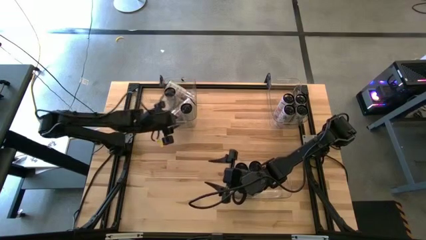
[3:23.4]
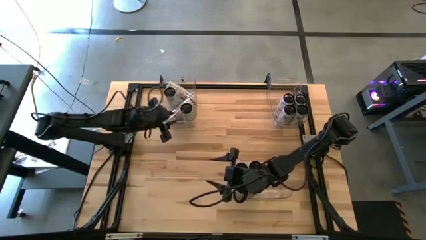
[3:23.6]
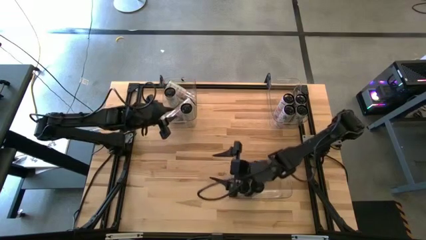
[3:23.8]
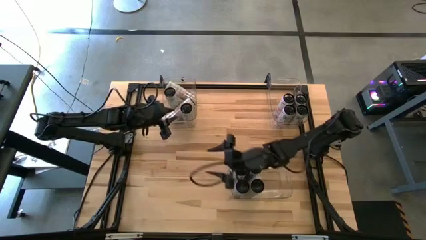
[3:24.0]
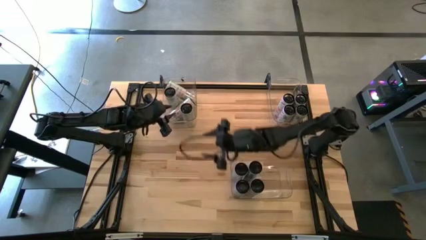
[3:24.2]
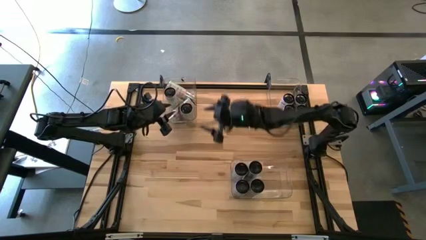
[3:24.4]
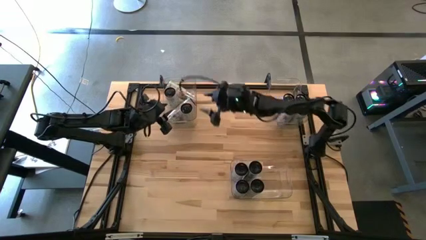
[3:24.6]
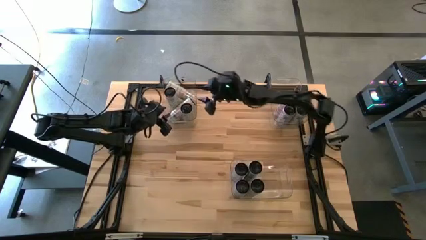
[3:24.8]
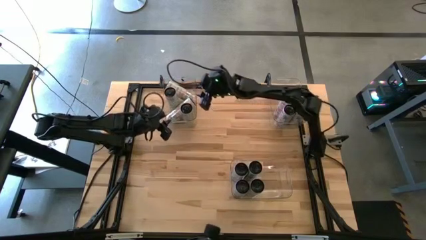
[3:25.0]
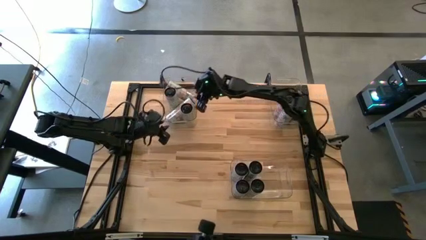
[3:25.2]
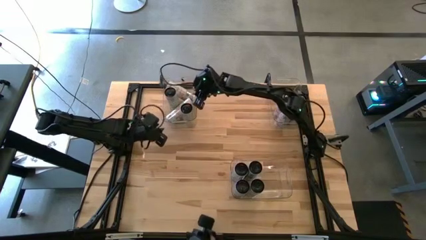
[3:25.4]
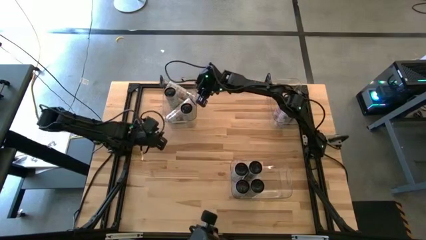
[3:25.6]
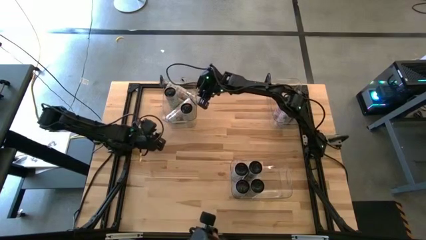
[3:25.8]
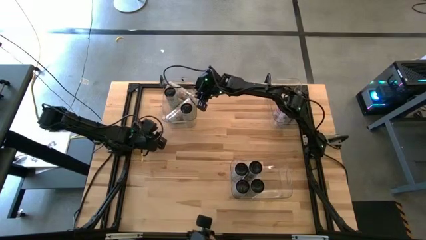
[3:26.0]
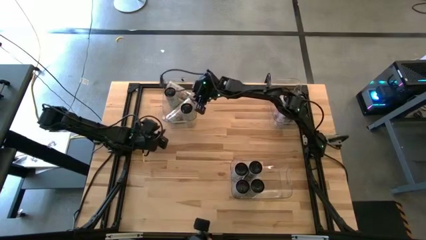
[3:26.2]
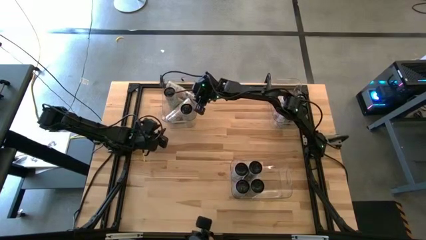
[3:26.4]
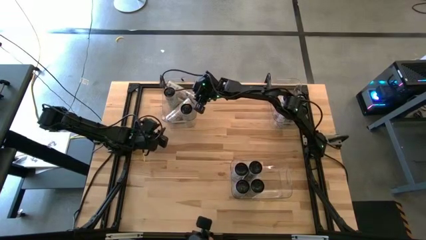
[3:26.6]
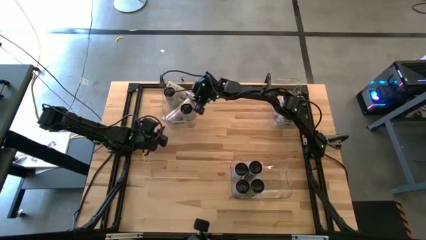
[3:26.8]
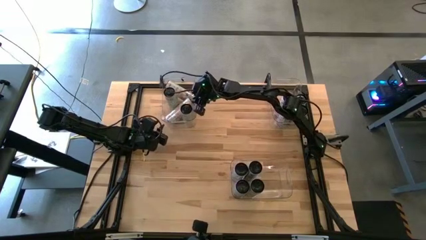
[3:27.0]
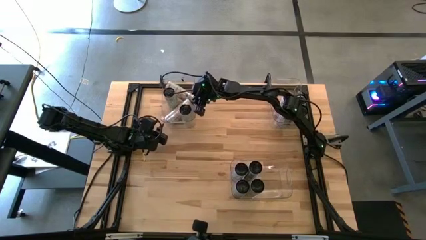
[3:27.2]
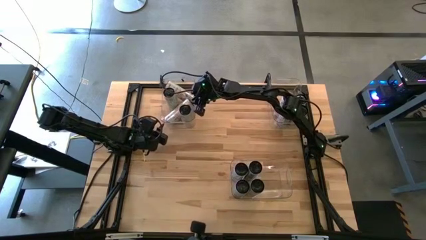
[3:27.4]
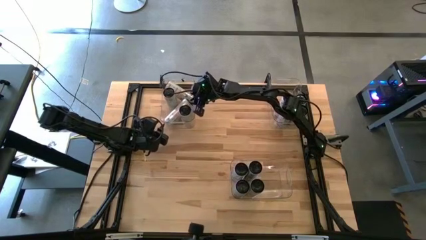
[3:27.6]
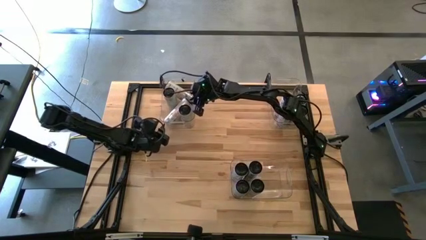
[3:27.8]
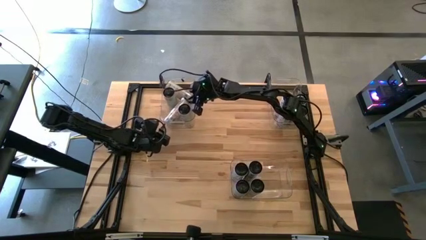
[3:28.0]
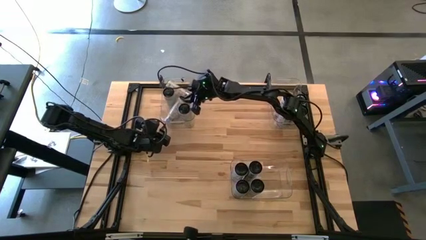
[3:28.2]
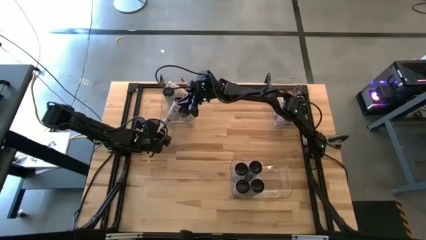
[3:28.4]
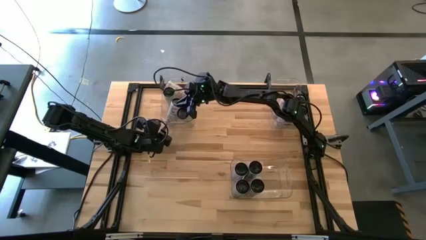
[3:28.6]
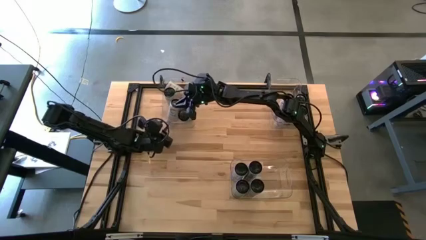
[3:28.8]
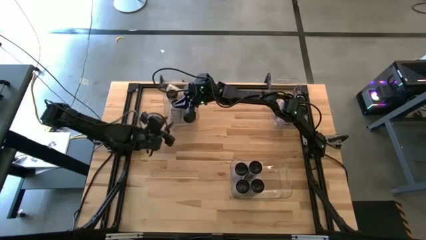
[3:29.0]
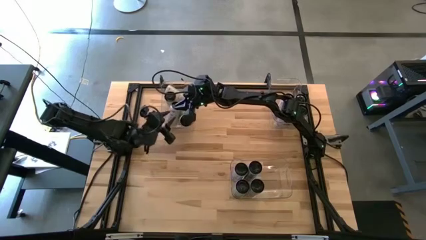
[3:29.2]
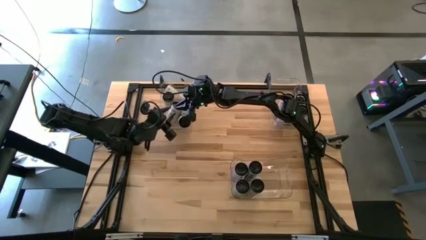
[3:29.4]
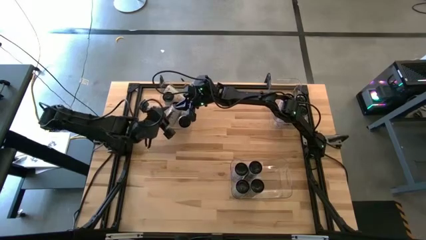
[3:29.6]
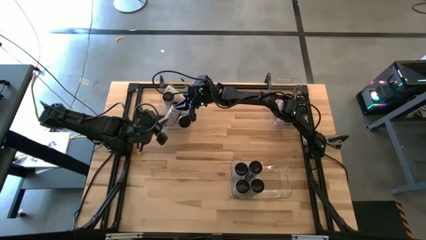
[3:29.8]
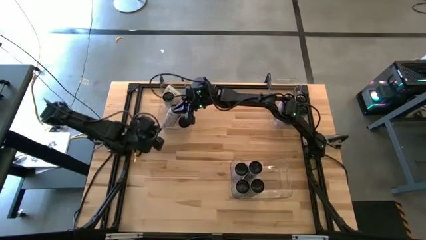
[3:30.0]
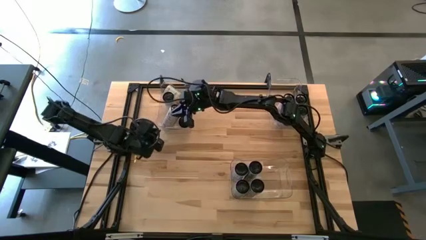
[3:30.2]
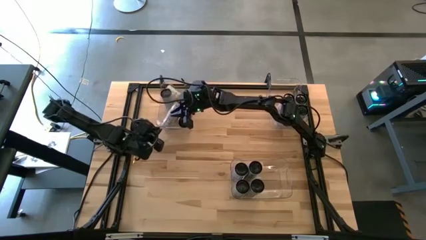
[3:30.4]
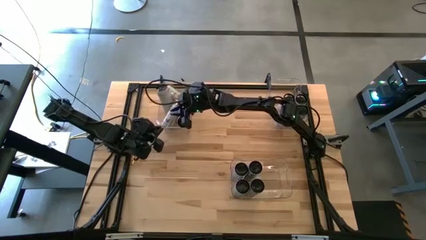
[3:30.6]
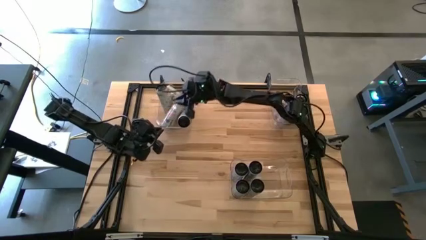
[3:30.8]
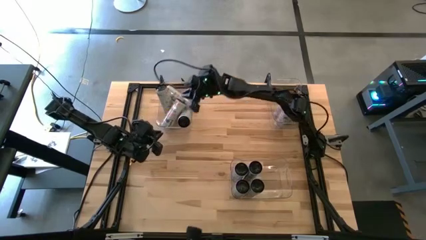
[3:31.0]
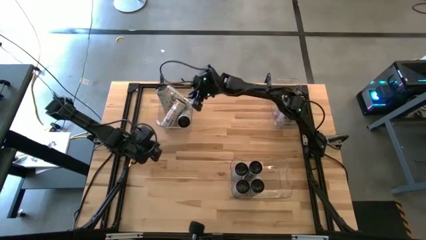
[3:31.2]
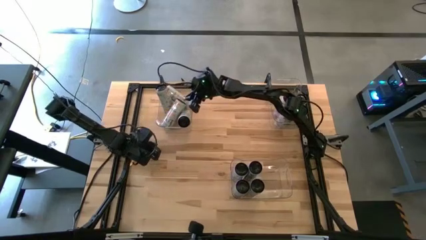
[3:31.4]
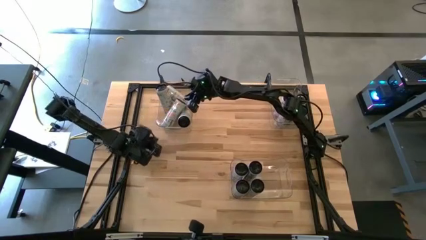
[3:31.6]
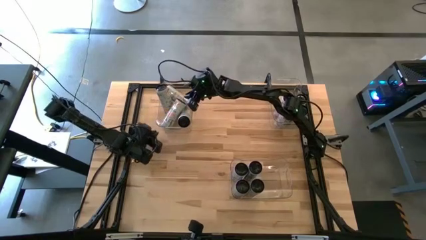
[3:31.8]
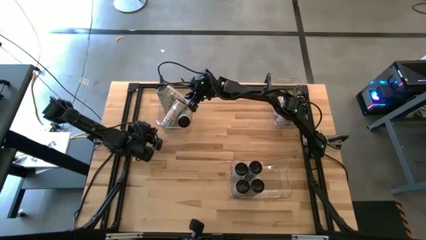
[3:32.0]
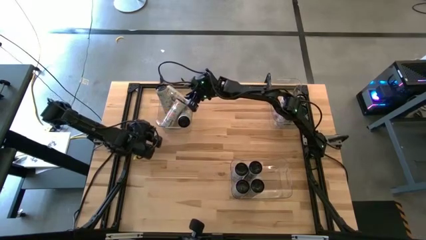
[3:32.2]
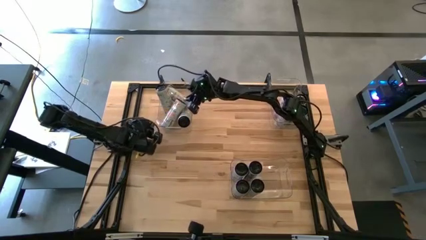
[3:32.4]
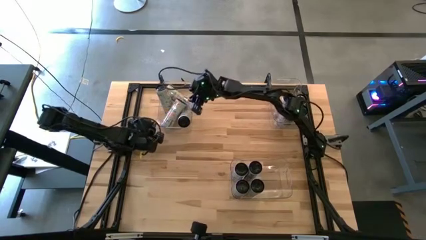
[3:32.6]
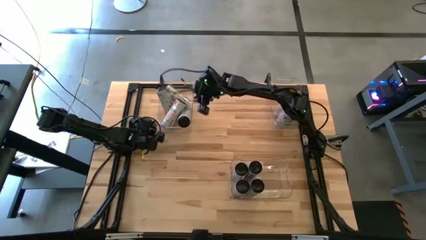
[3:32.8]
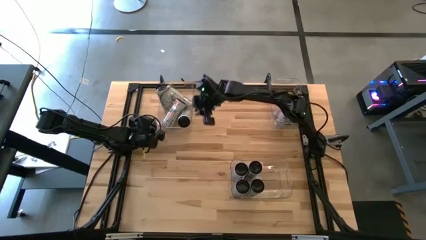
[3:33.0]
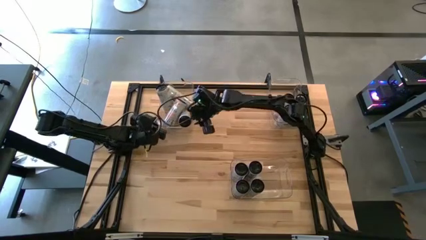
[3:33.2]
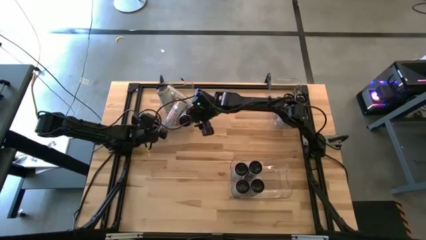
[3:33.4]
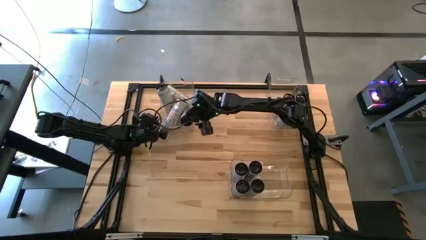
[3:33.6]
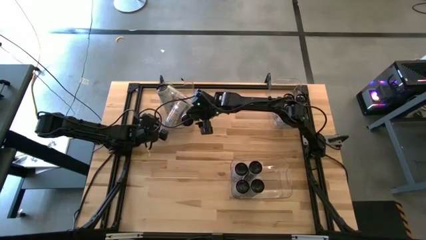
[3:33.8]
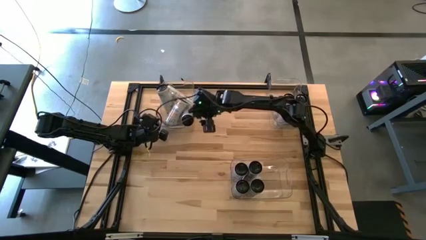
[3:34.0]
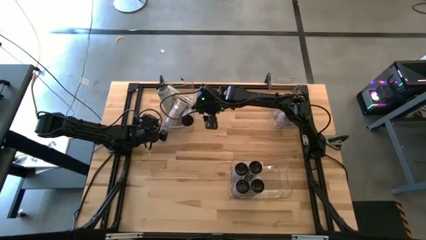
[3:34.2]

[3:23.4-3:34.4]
Task: Sort soda cans
Adjust the white/yellow soda cans
